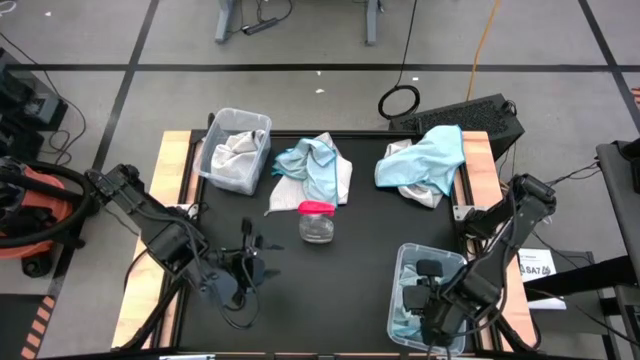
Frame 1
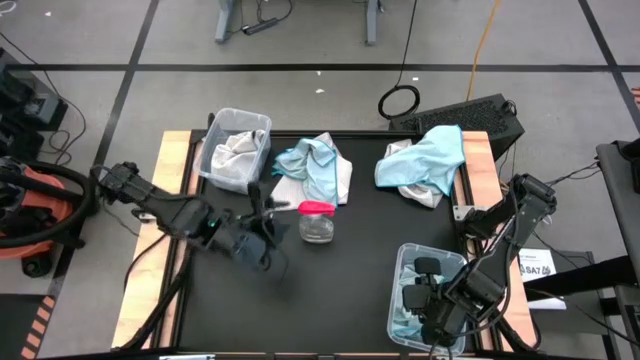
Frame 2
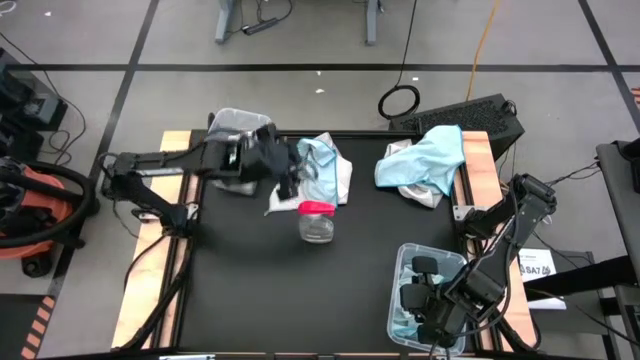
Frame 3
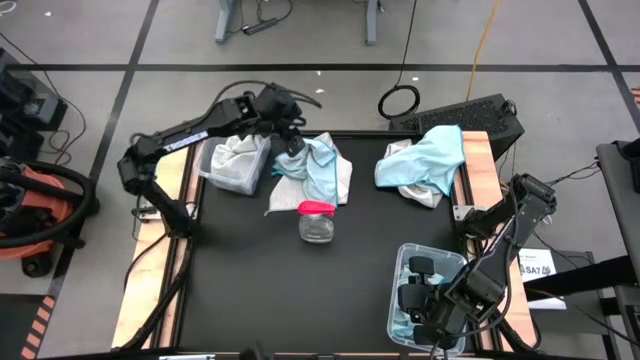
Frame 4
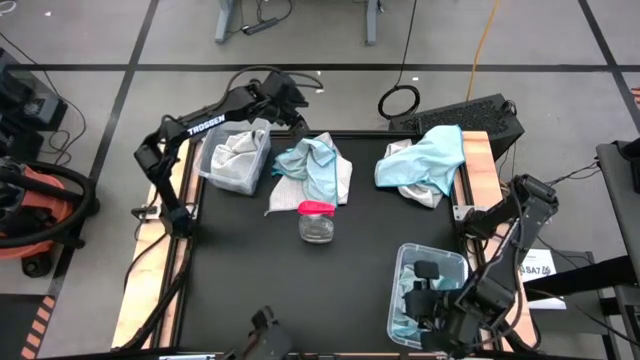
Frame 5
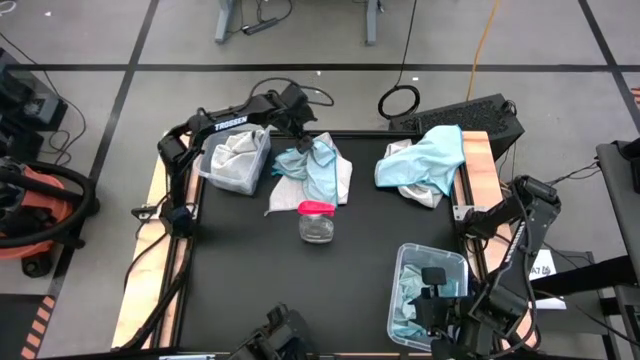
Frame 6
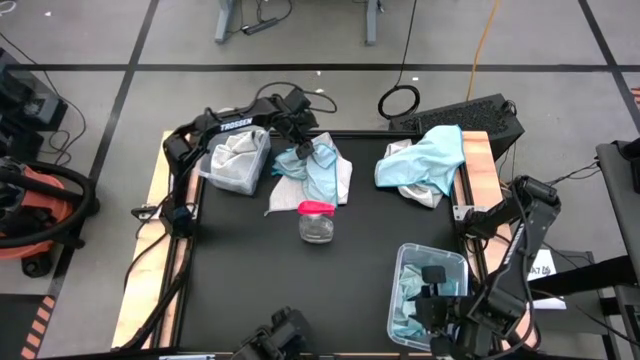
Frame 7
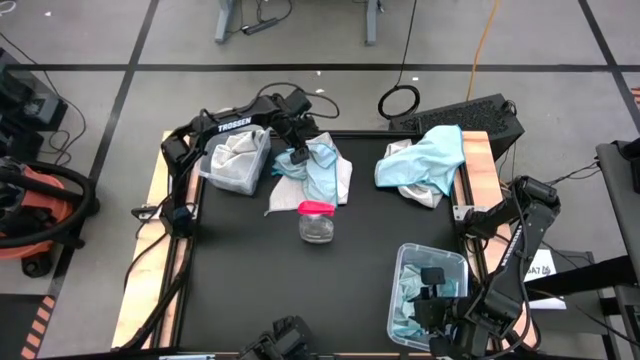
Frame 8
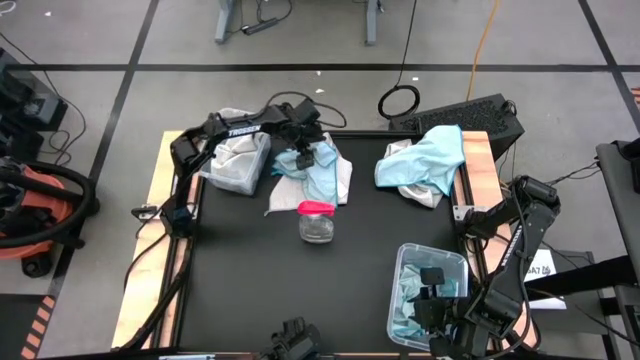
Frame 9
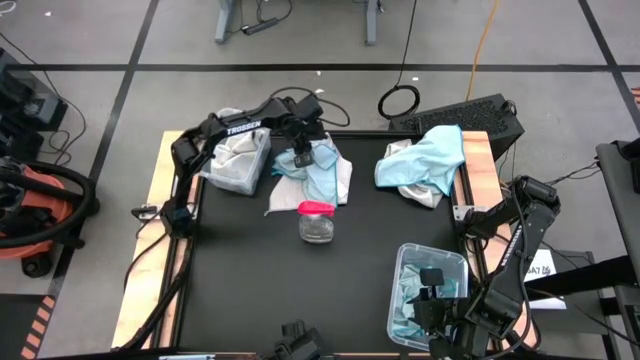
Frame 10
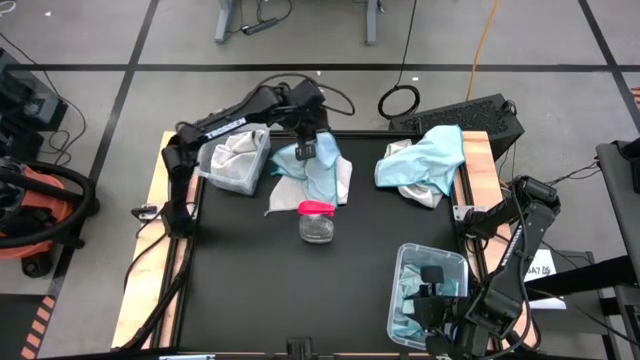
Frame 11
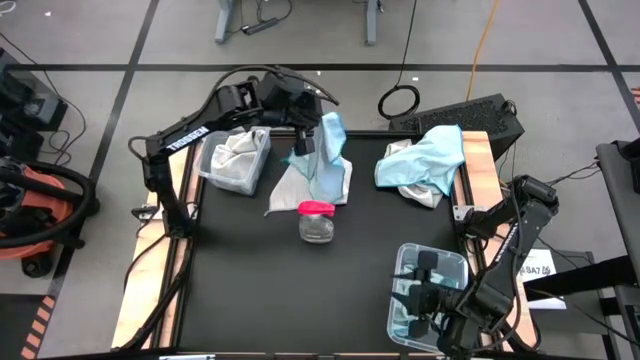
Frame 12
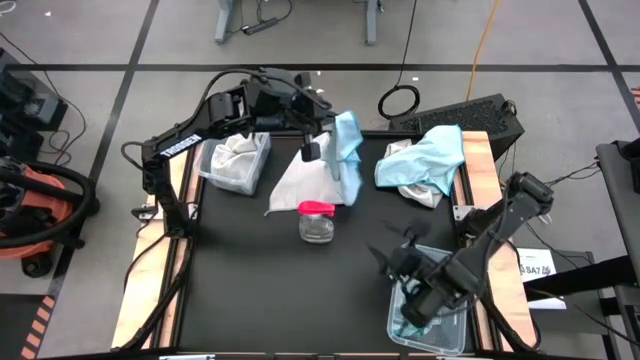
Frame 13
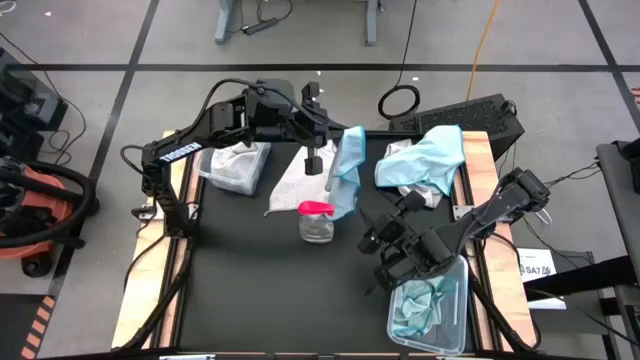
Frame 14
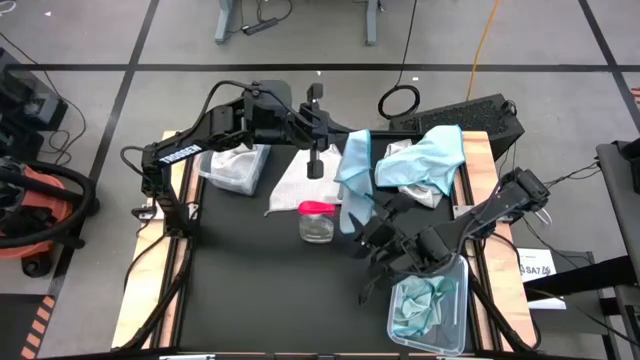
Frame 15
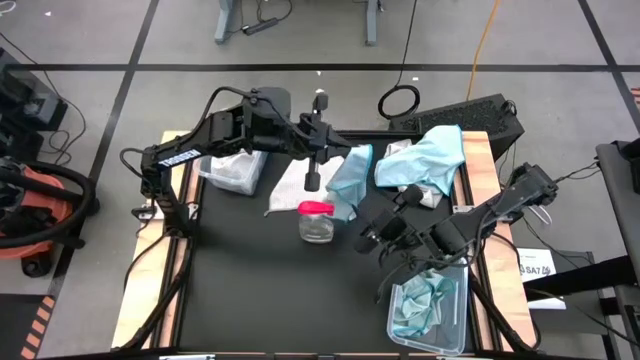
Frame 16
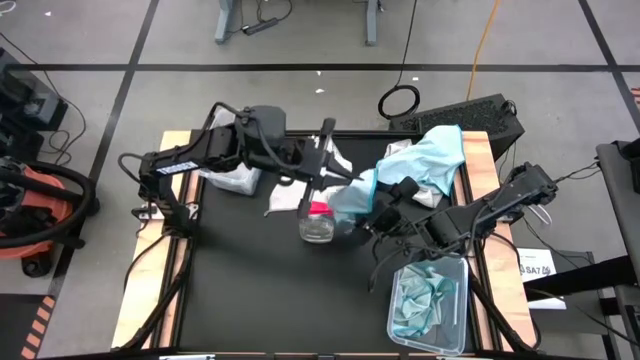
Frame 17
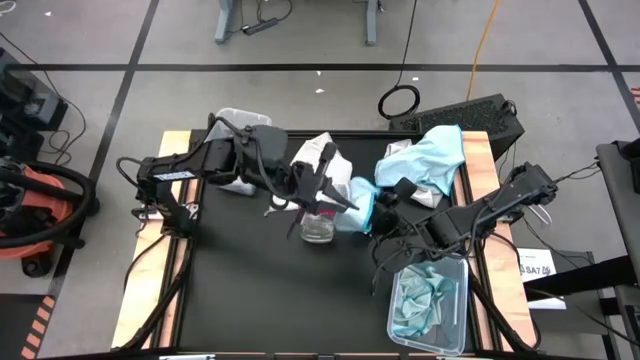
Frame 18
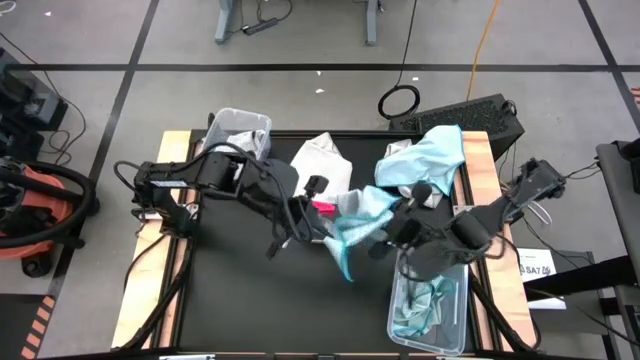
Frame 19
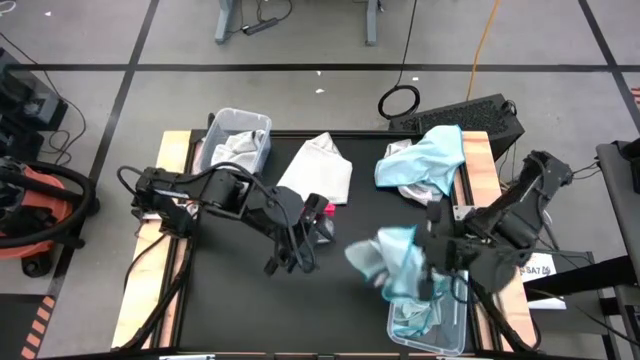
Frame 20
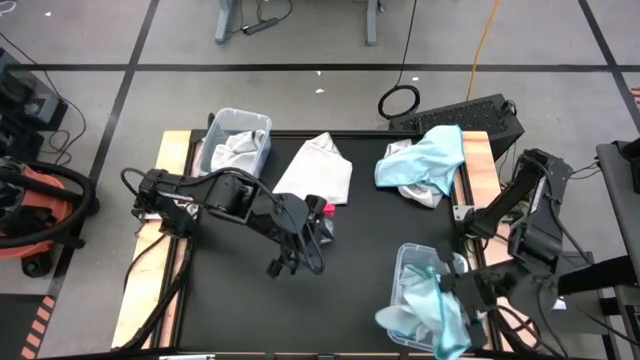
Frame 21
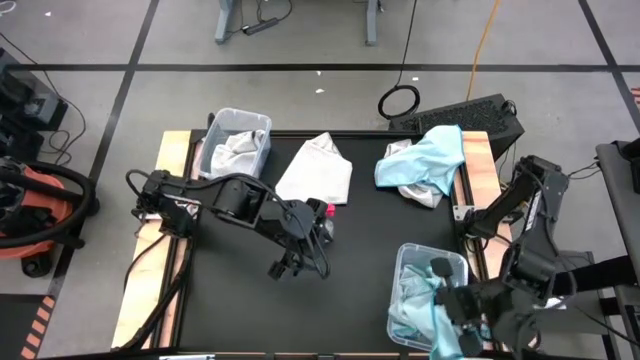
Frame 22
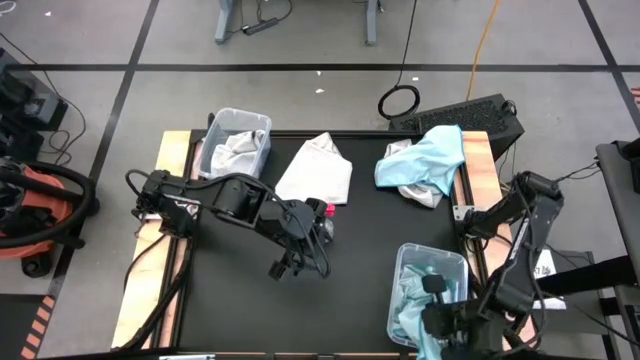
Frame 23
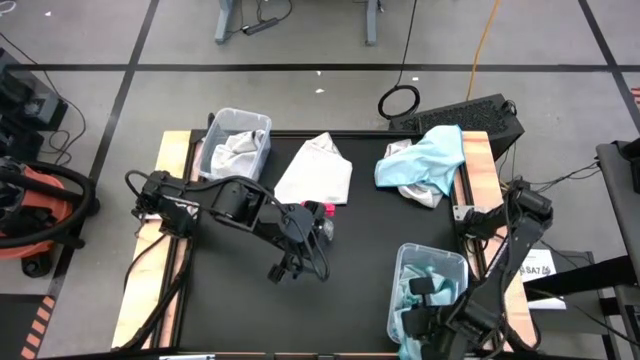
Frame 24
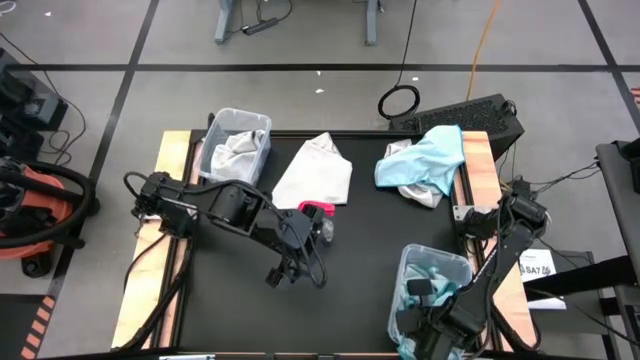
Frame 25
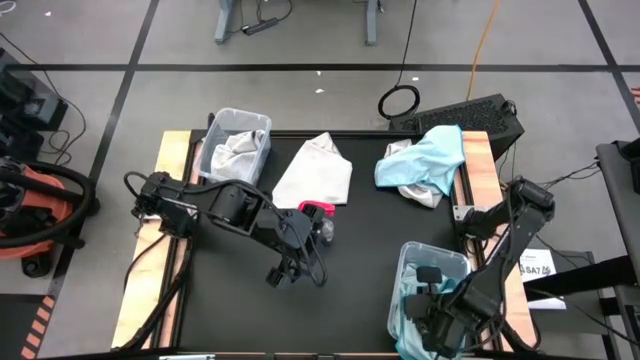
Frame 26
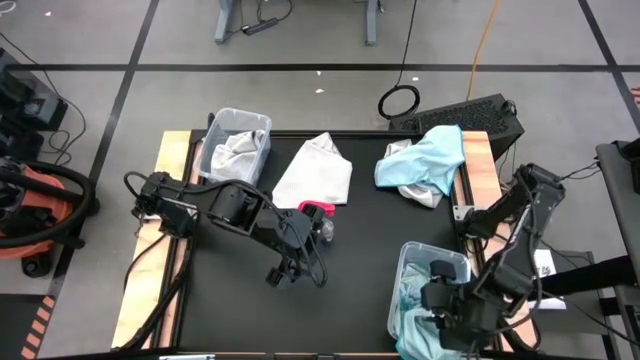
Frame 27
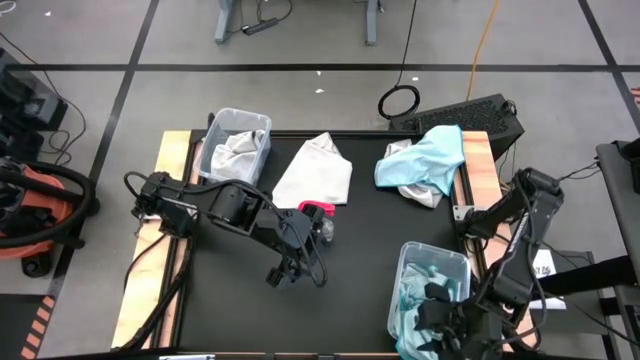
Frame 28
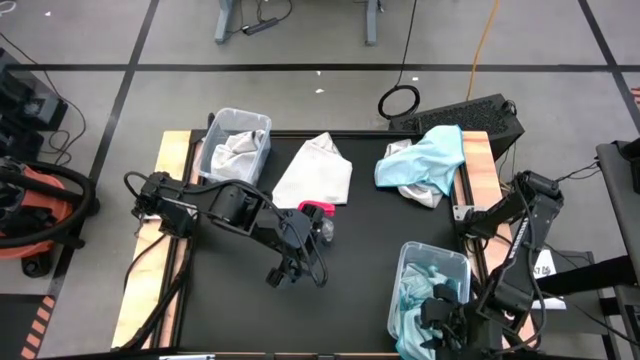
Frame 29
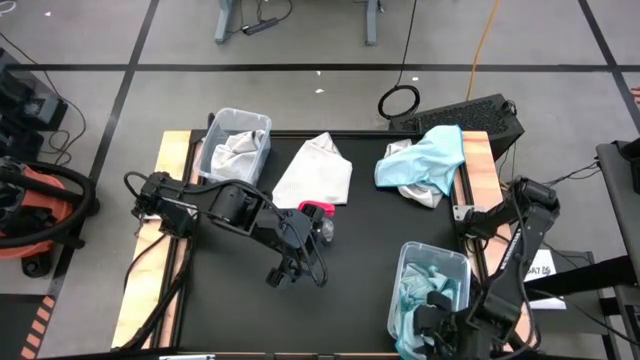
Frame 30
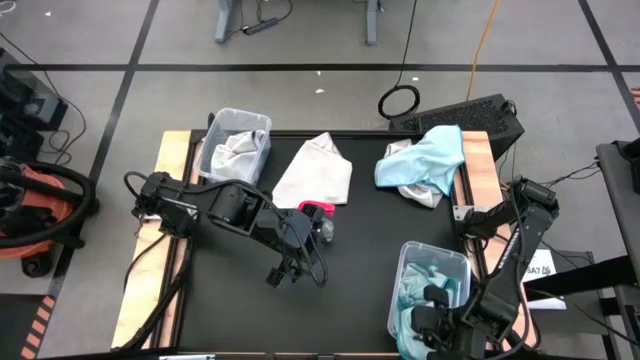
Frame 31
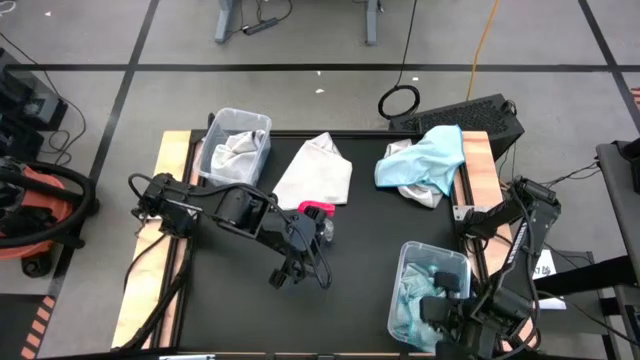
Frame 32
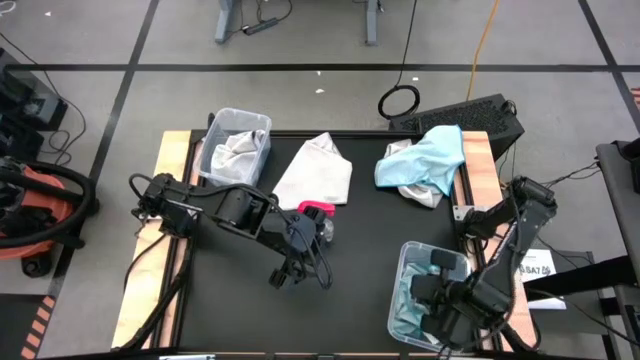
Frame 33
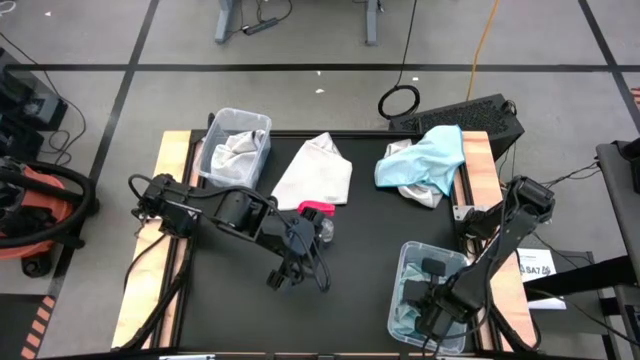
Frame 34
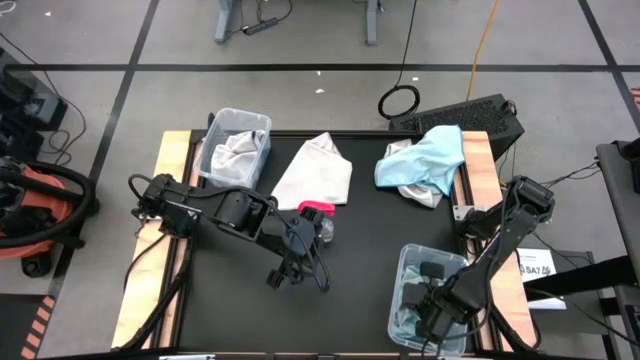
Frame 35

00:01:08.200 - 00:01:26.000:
Task: Sort microfiber towel by color & place in baskets
Put the left light blue towel into the right transparent bin

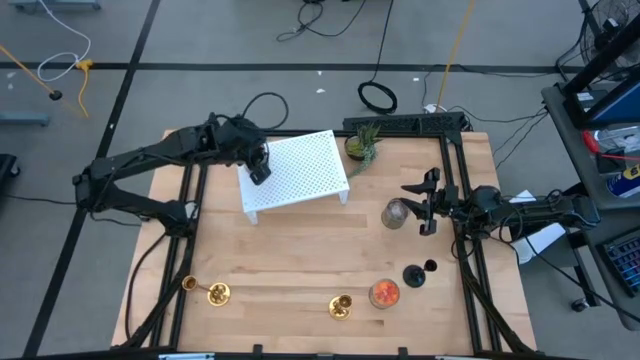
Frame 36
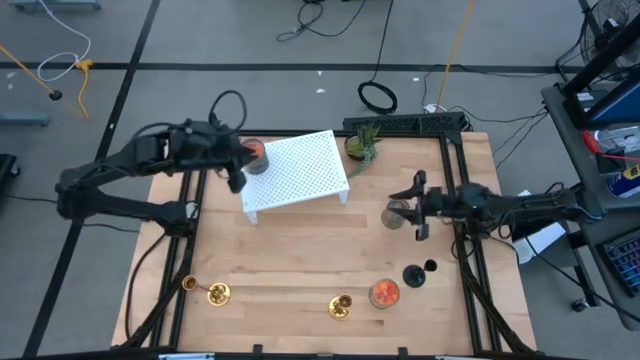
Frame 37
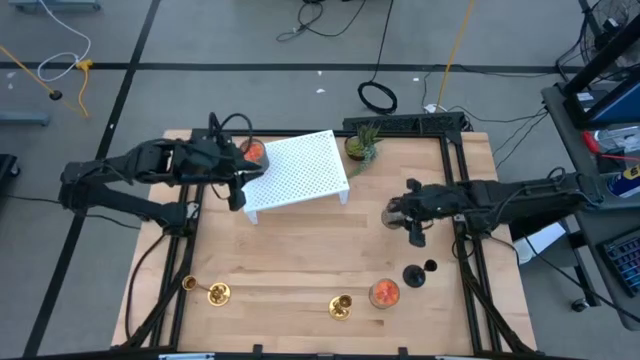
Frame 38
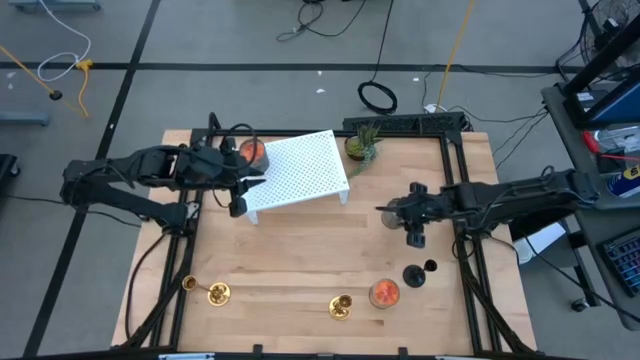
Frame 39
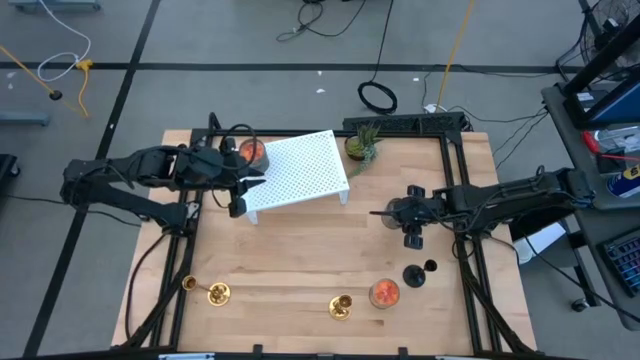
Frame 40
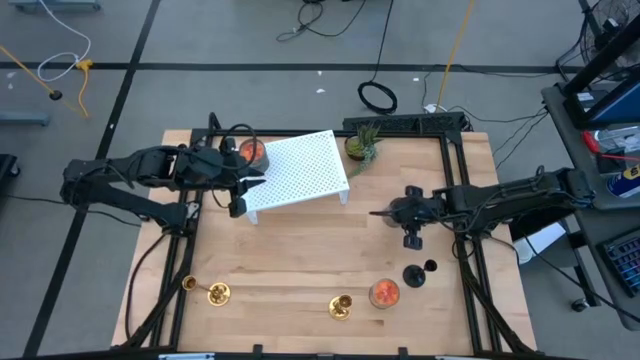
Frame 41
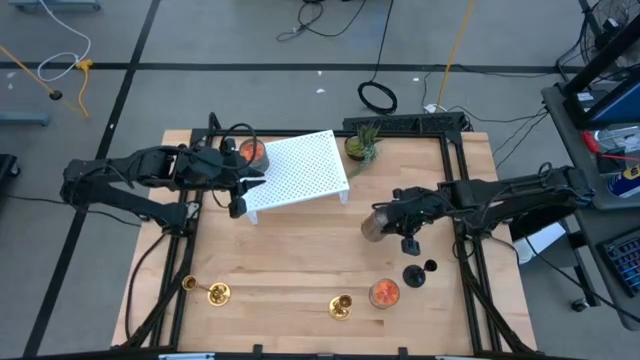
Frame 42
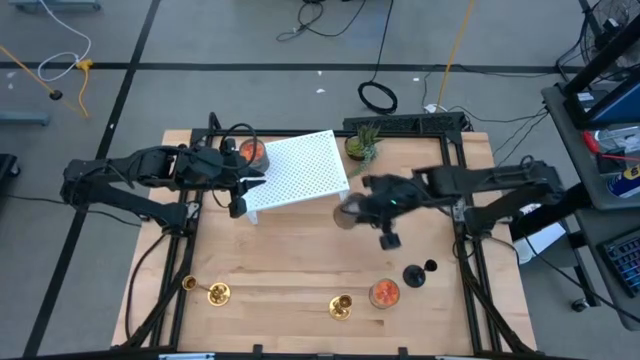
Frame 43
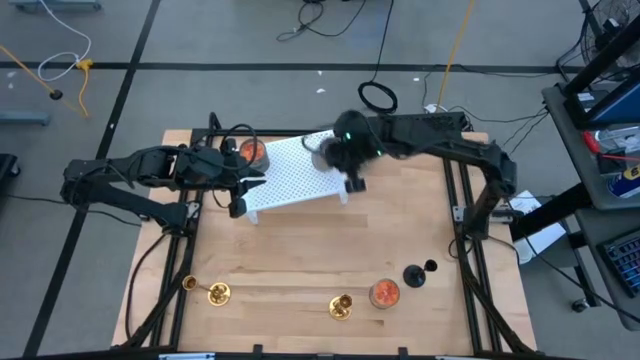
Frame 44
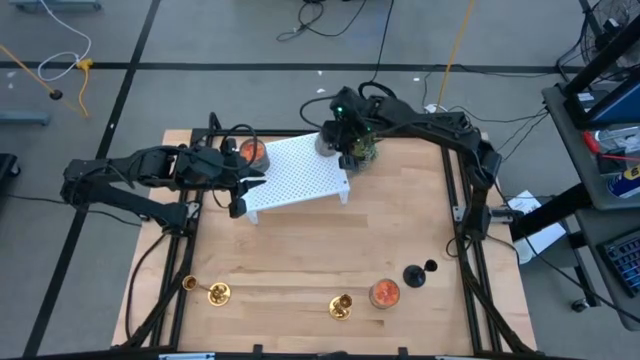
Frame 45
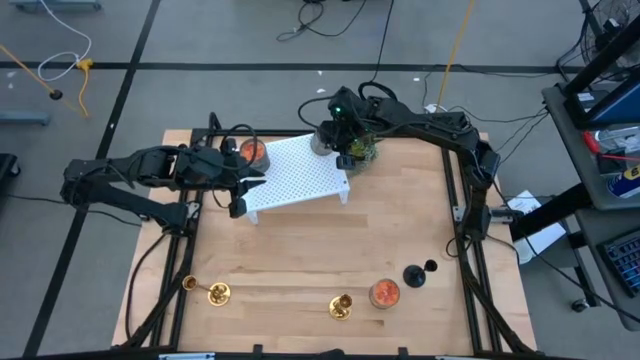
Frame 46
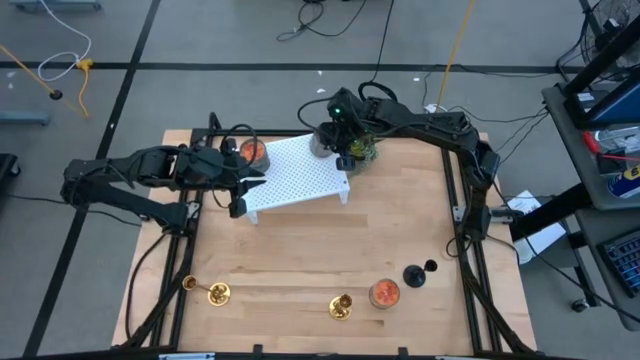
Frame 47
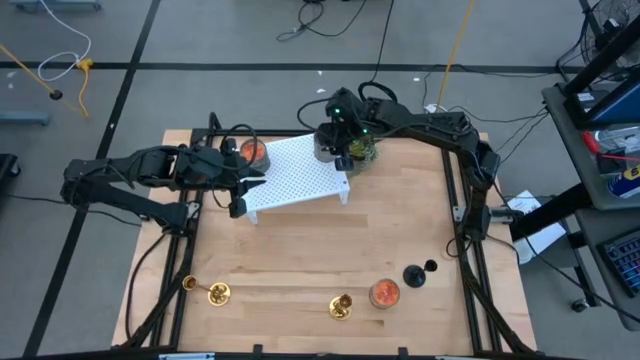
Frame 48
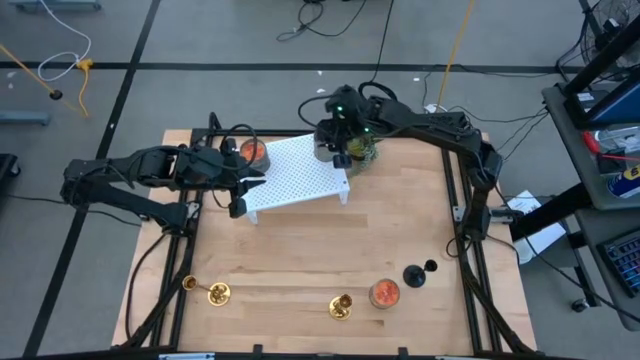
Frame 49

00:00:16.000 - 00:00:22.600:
Task: Pick & Place candle stick holders
Put the brown scented candle on the shelf
